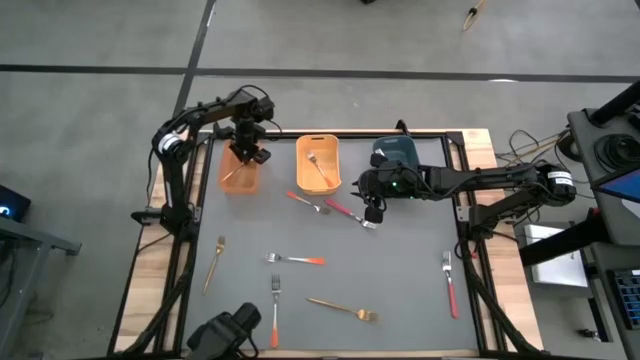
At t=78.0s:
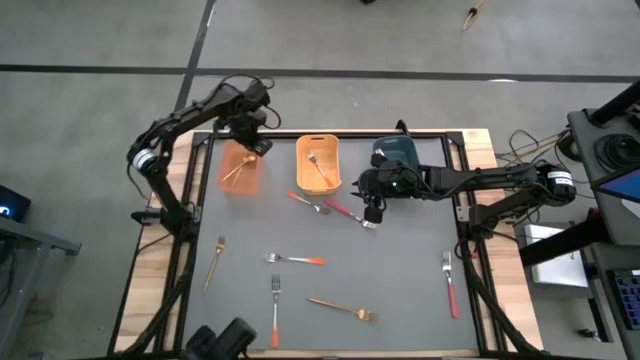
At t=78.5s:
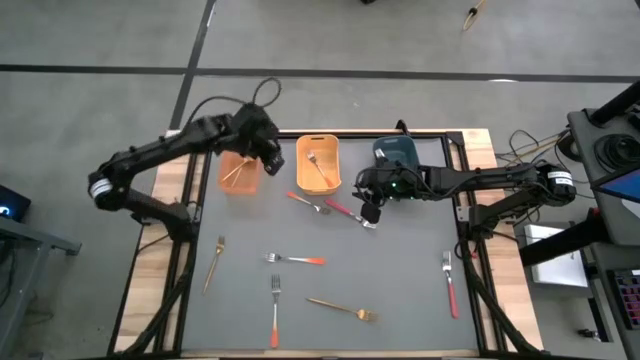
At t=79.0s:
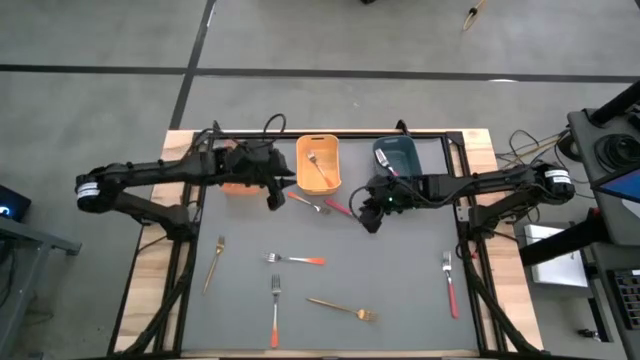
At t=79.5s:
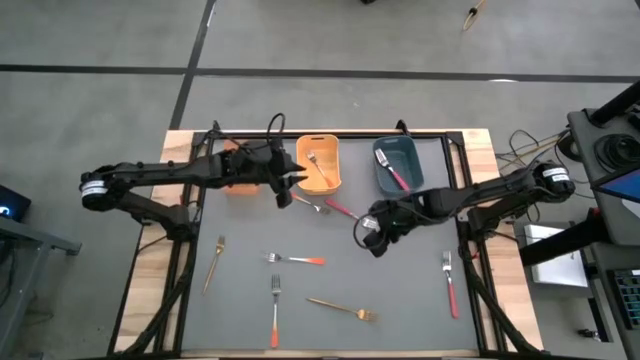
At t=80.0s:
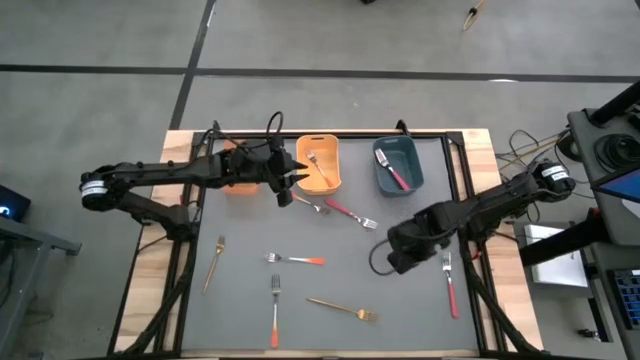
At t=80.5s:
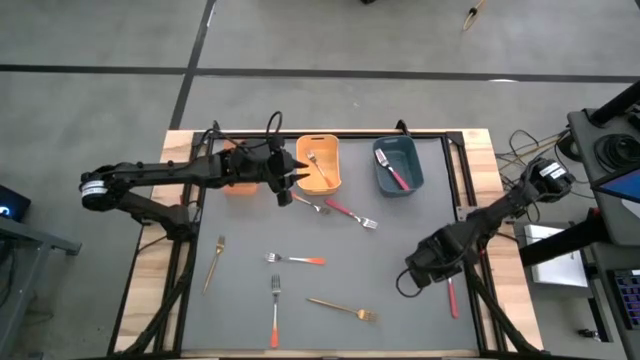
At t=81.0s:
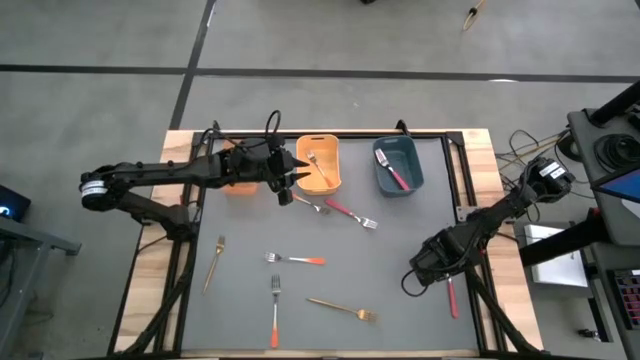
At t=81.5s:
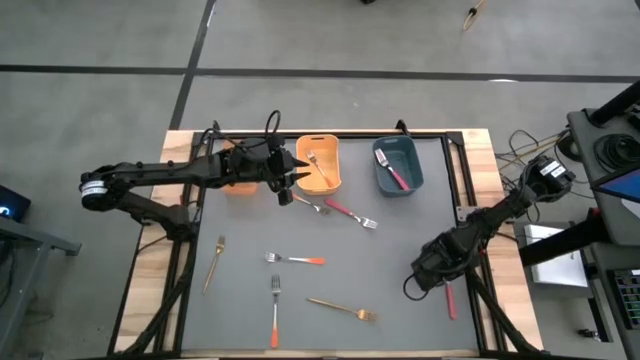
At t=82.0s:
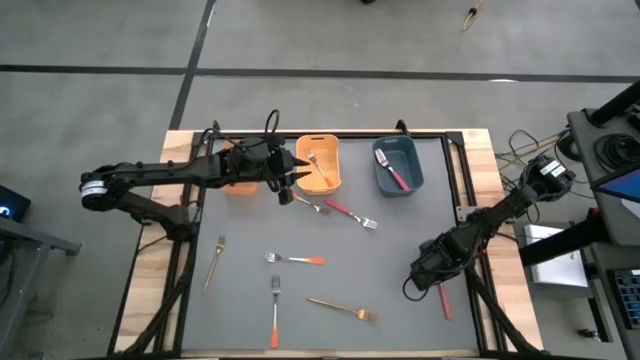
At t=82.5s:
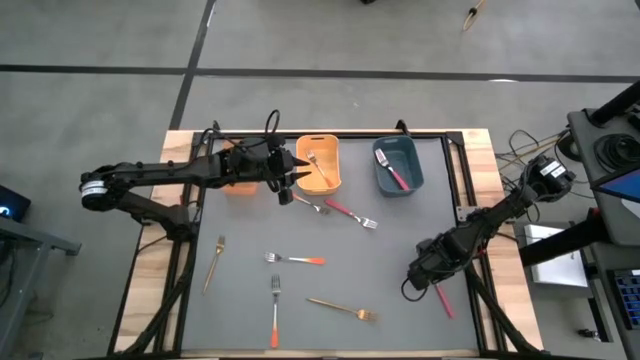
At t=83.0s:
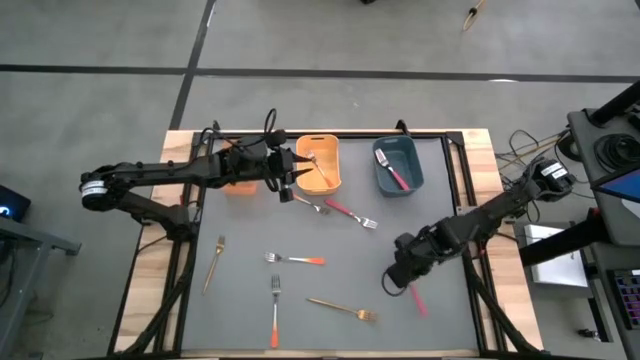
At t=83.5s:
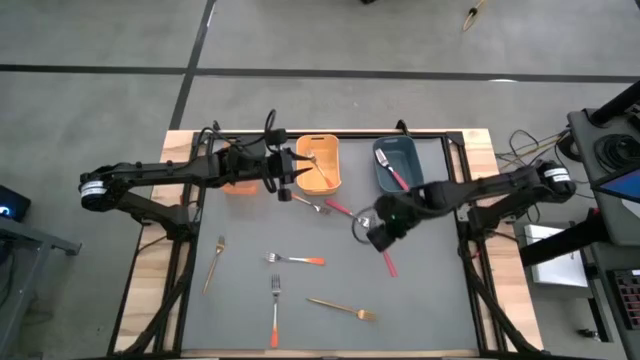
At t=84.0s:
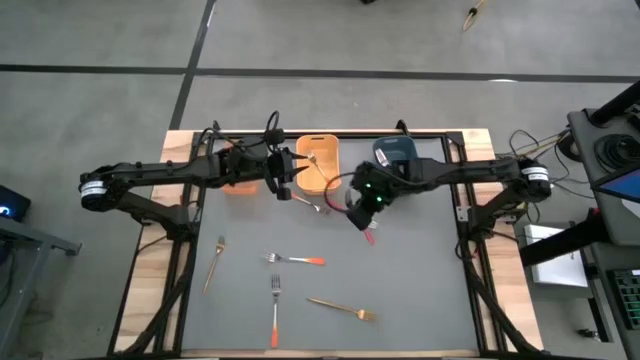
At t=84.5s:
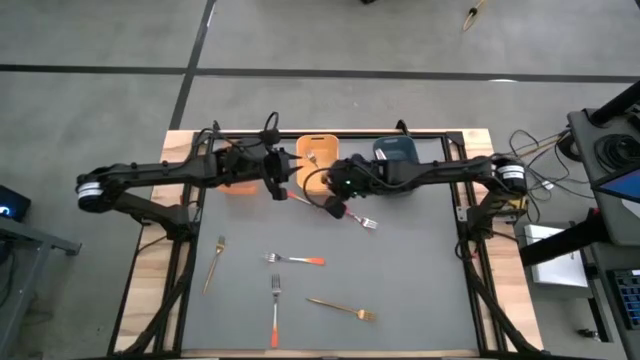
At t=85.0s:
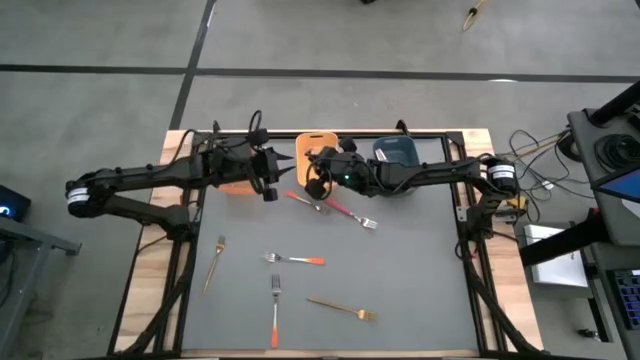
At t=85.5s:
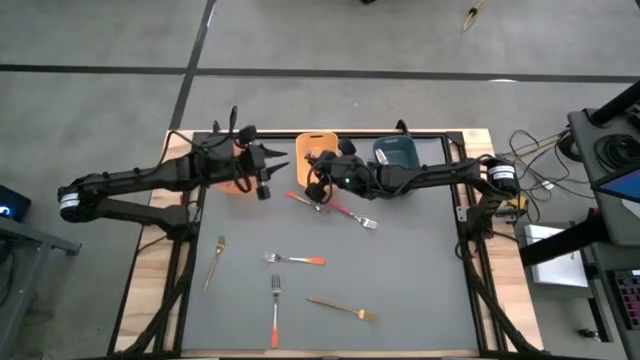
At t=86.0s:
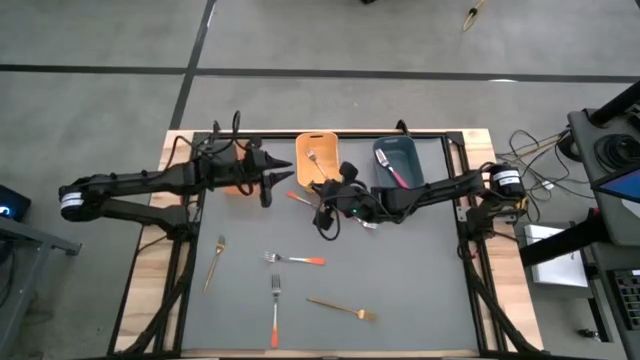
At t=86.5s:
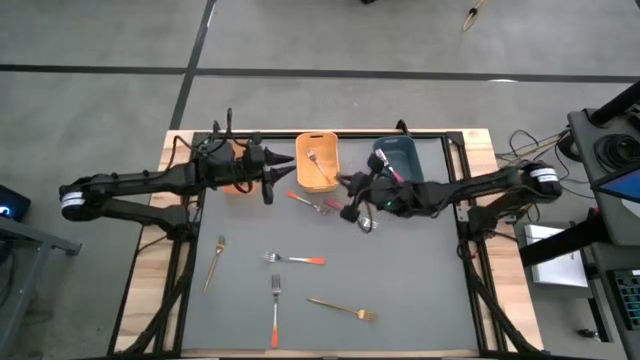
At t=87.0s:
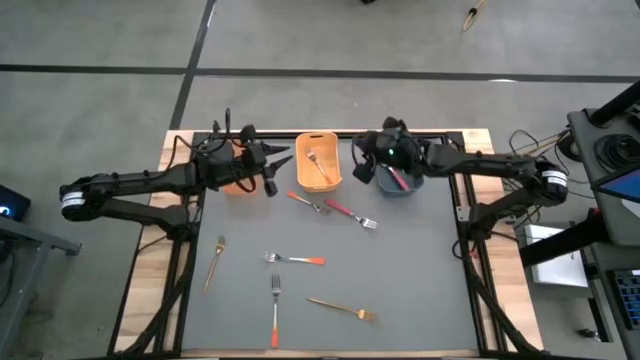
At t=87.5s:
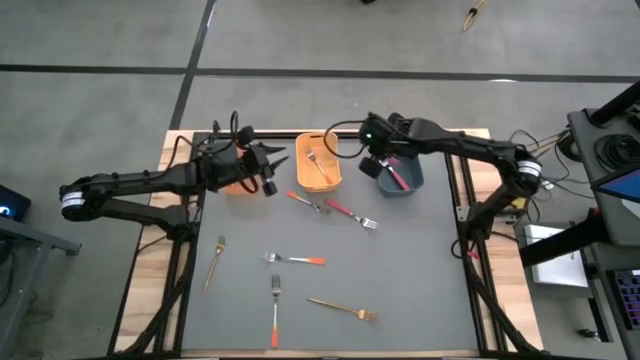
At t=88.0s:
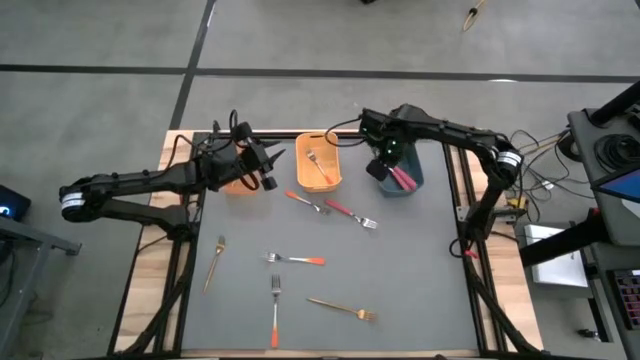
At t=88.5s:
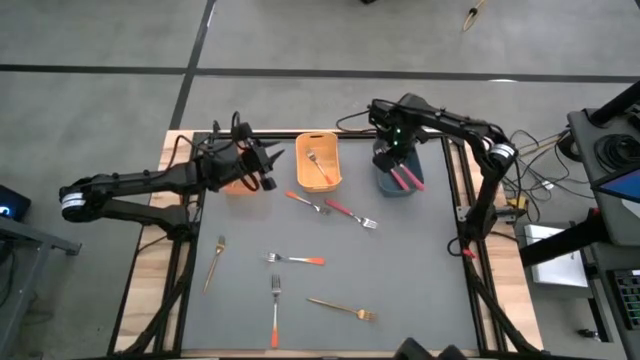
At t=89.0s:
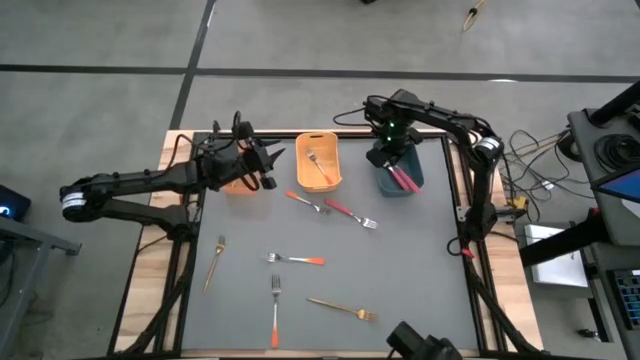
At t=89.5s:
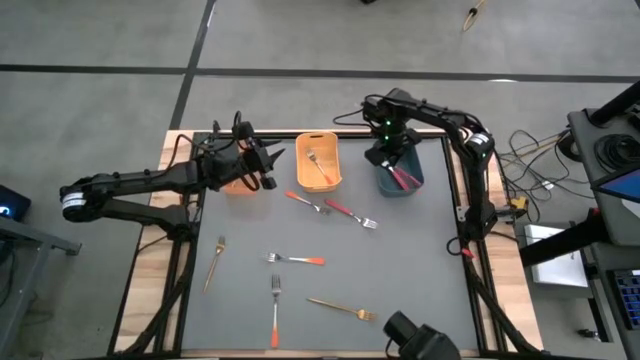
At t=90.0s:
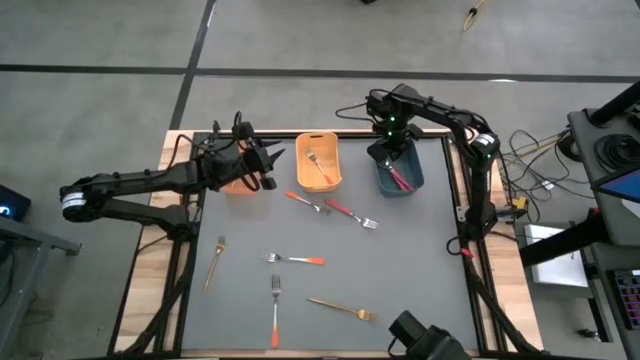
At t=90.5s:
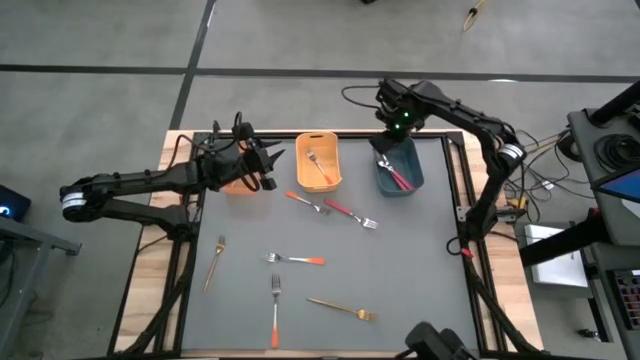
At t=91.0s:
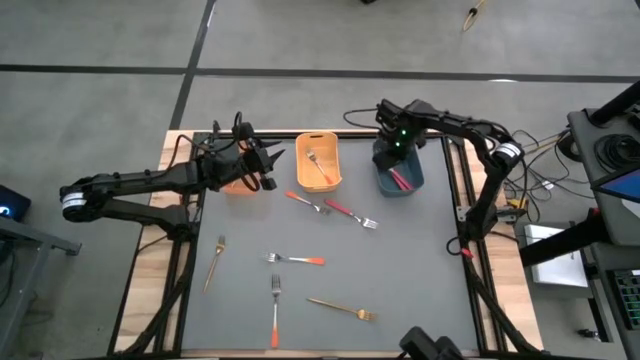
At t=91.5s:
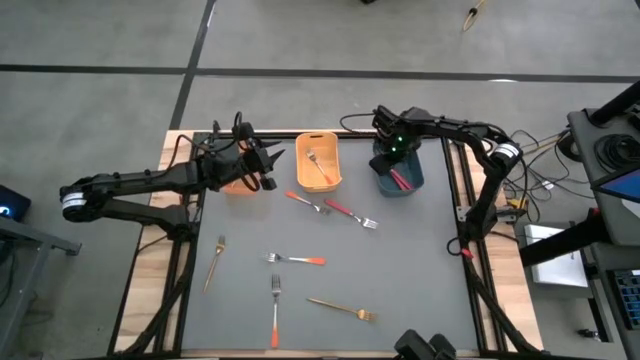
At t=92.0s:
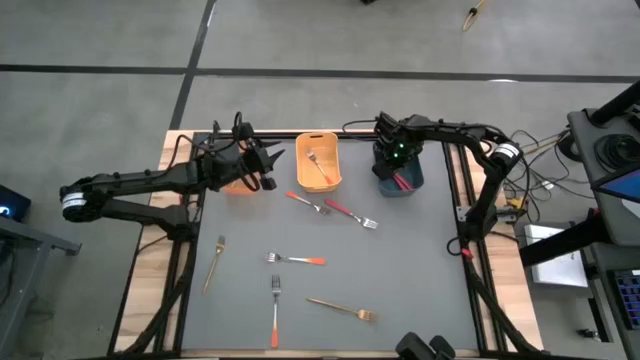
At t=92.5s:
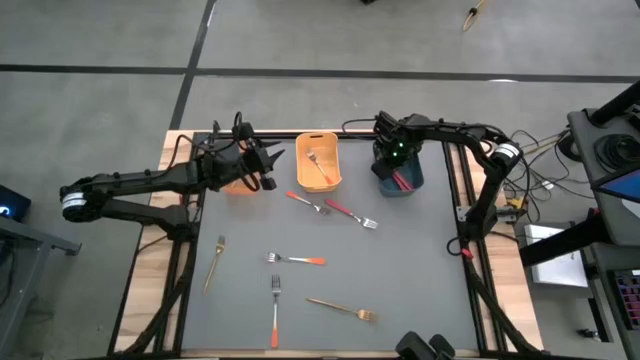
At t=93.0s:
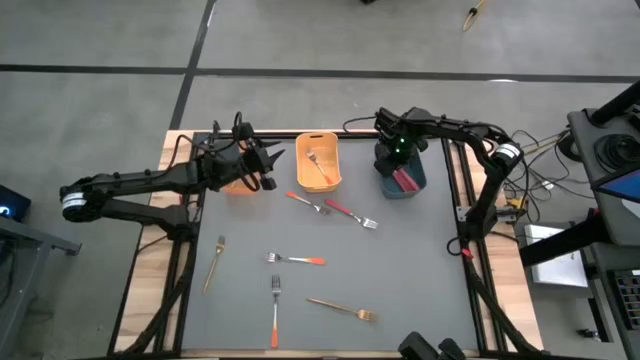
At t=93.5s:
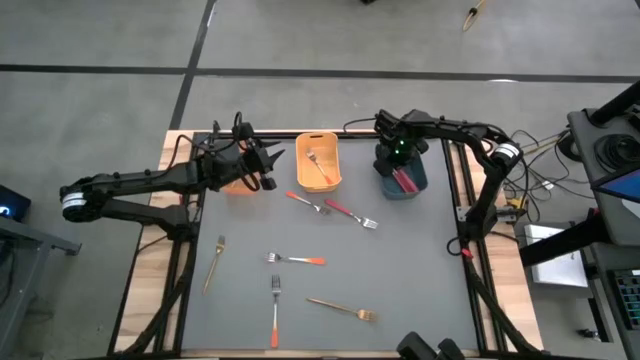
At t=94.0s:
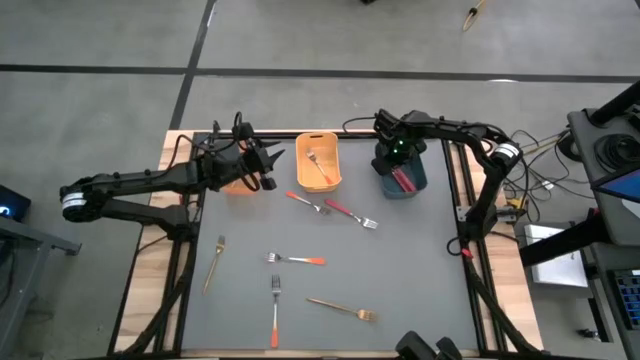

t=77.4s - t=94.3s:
Task: Sort silverware by color (type)
Put the red fork into the blue bin

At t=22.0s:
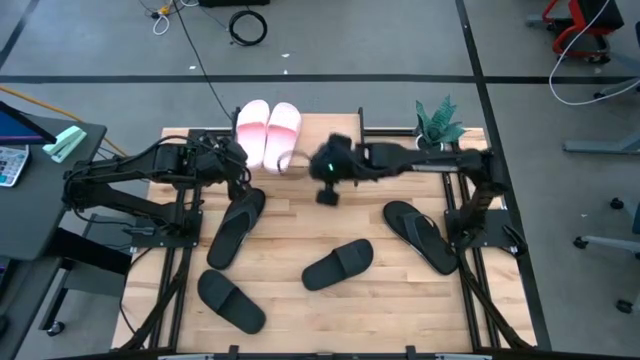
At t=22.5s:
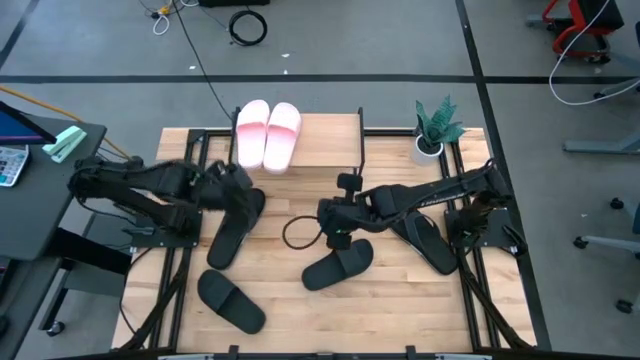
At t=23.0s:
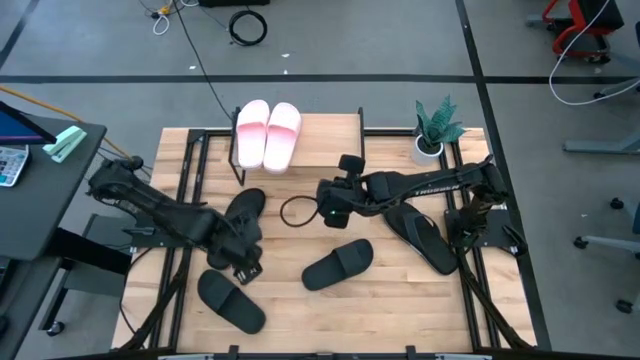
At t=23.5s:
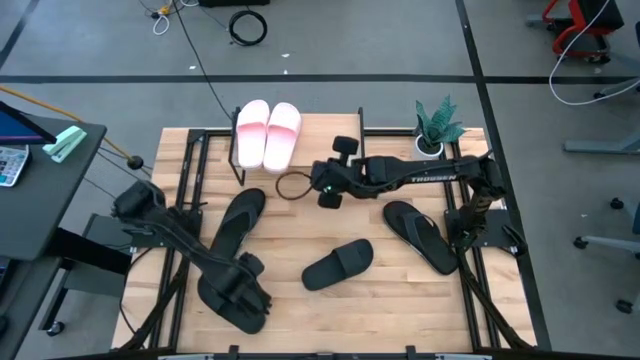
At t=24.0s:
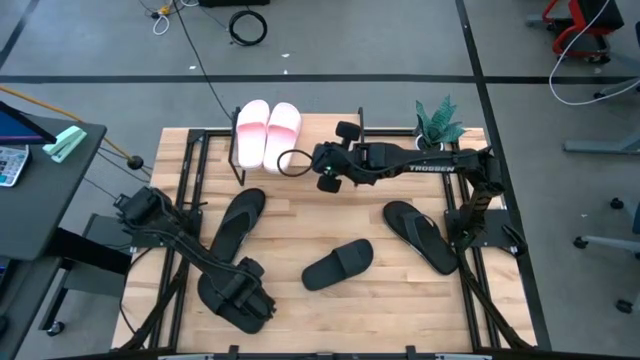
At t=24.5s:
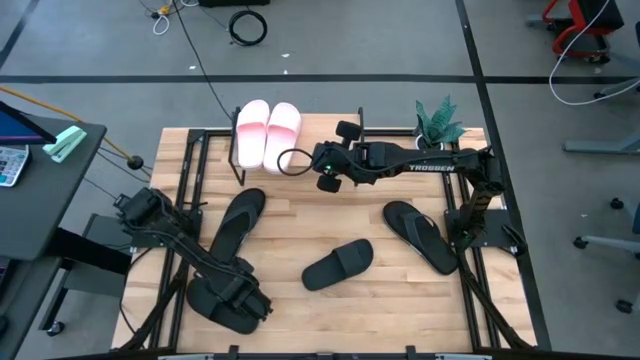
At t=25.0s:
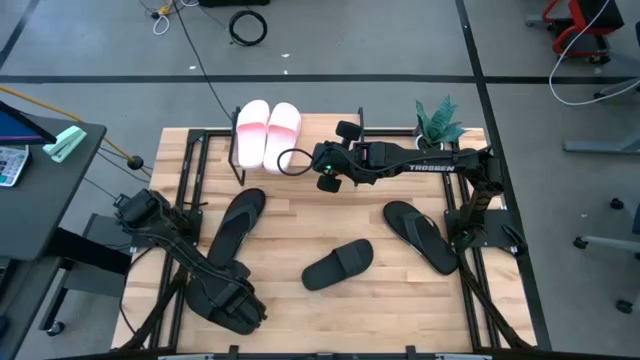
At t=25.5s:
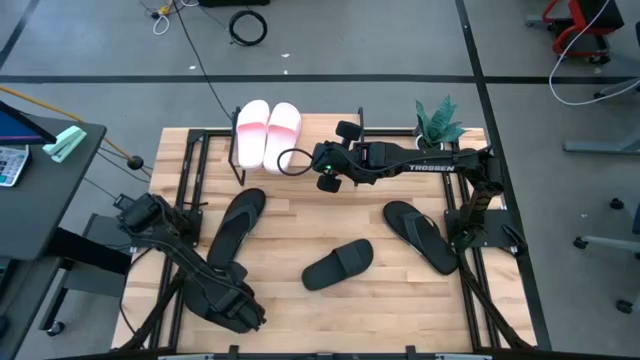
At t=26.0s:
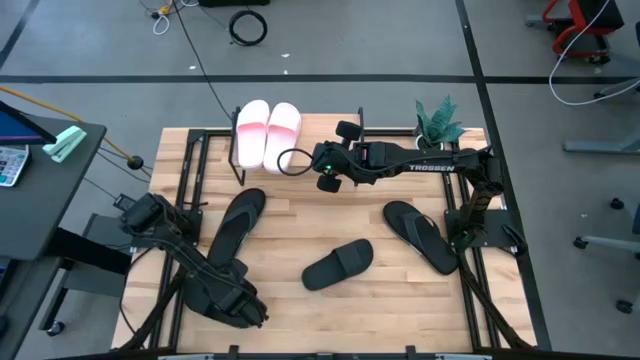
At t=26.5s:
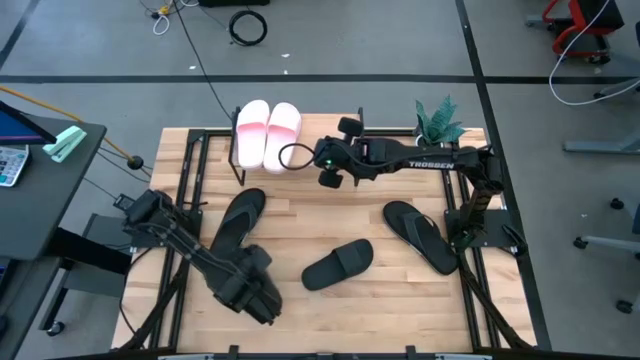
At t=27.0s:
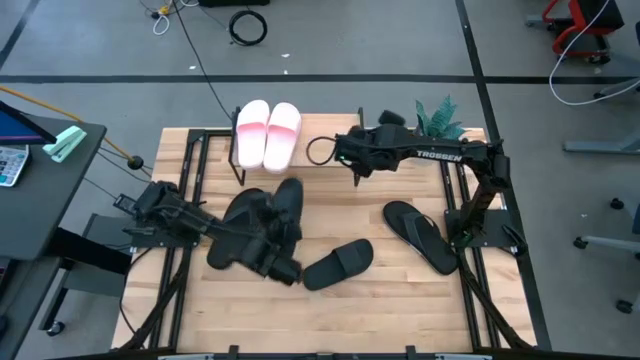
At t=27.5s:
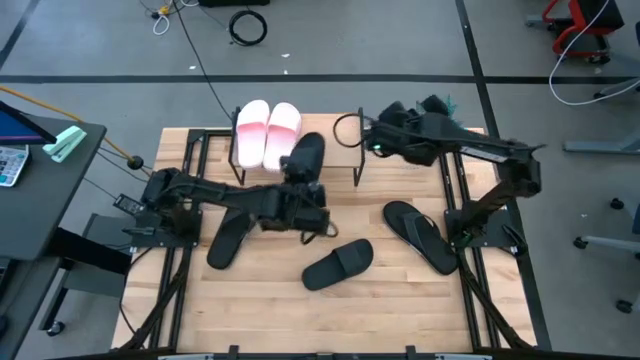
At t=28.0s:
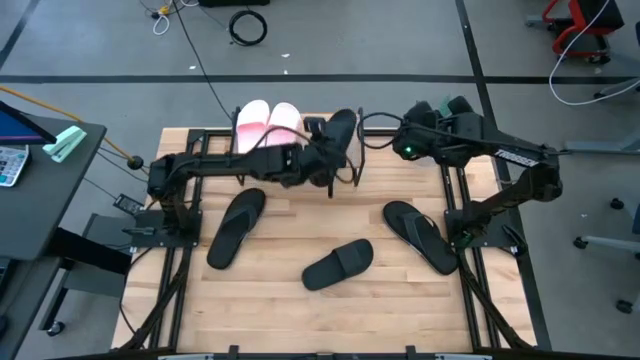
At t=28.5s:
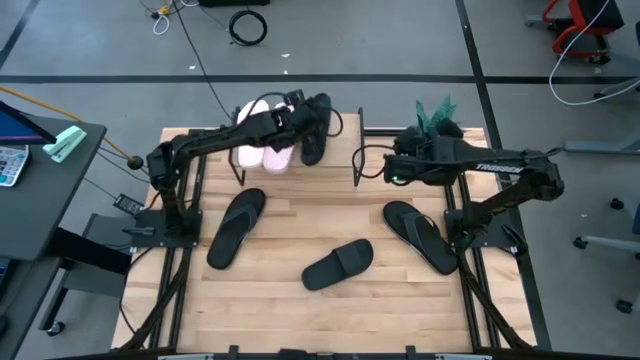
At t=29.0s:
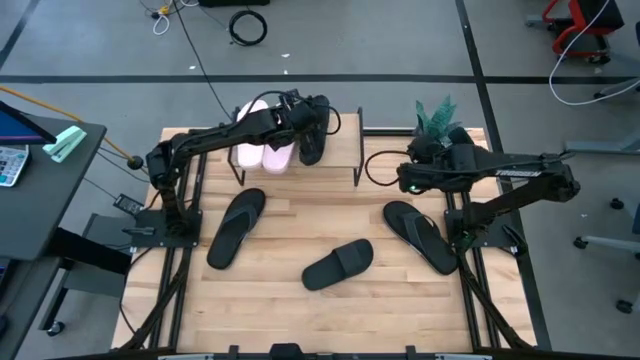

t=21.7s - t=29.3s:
Task: Pick and place slides into the shelf
Put the bottom left black slides on the shelf aligned with the pink slides
